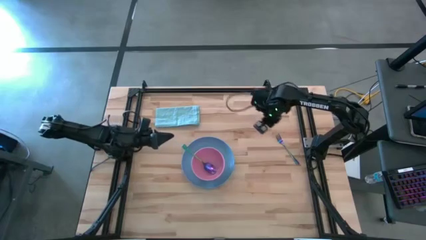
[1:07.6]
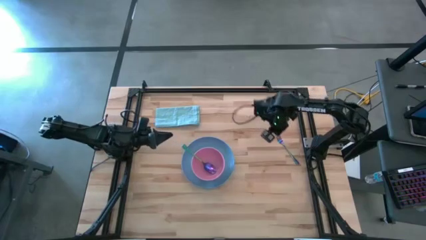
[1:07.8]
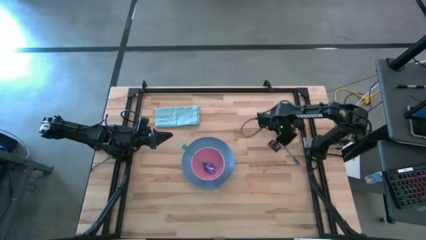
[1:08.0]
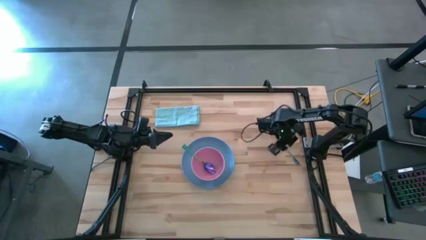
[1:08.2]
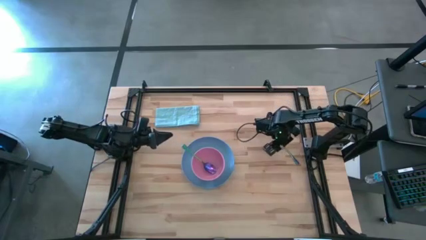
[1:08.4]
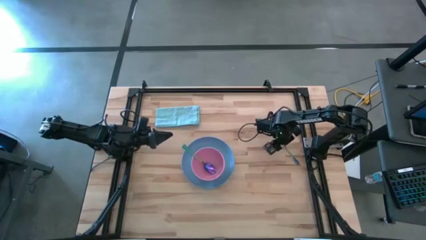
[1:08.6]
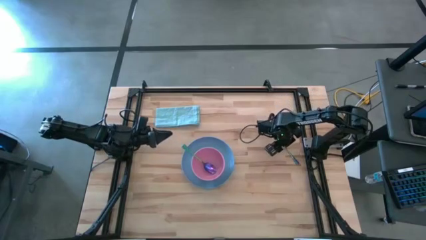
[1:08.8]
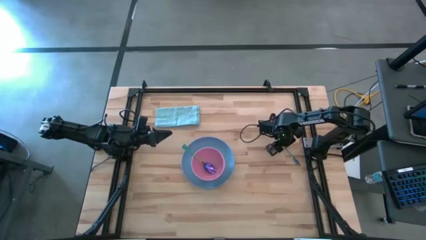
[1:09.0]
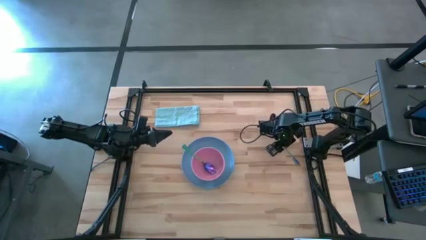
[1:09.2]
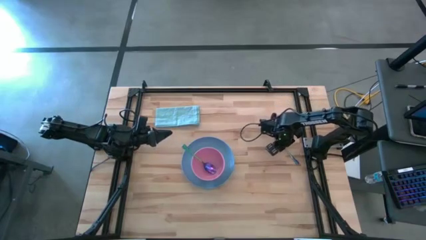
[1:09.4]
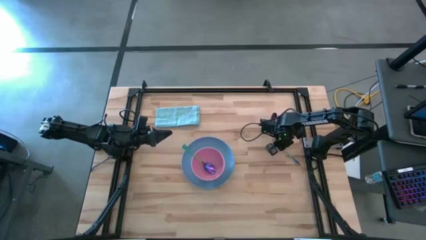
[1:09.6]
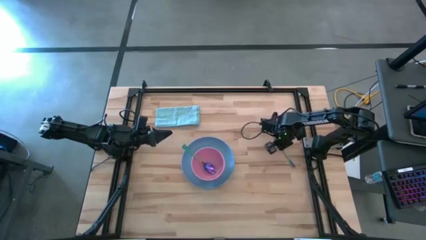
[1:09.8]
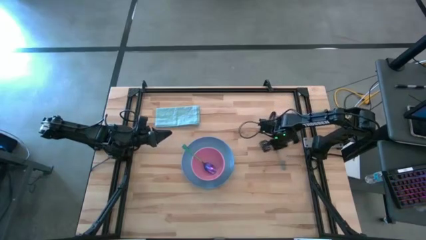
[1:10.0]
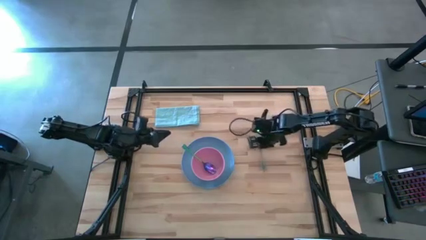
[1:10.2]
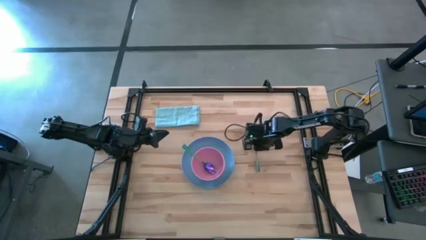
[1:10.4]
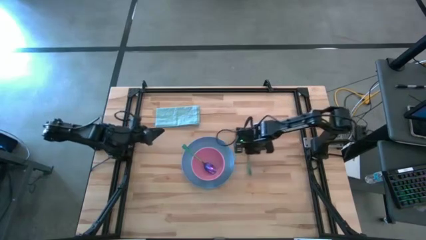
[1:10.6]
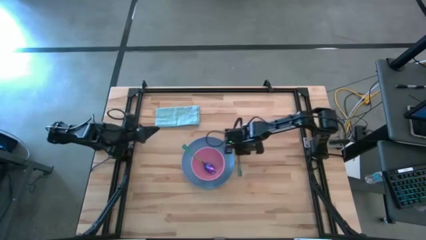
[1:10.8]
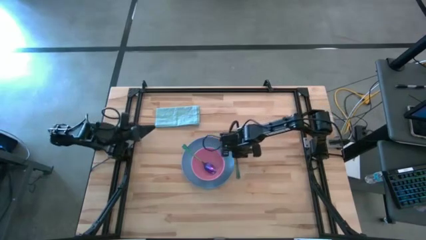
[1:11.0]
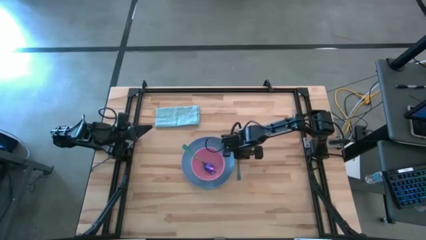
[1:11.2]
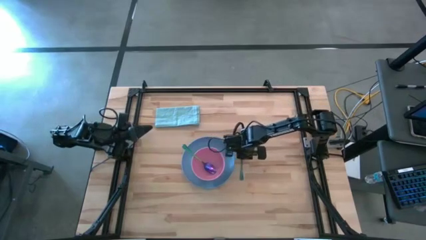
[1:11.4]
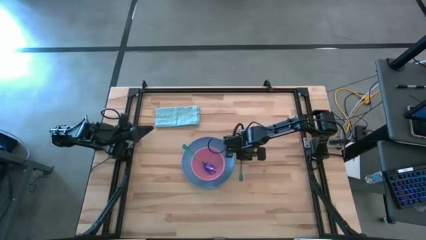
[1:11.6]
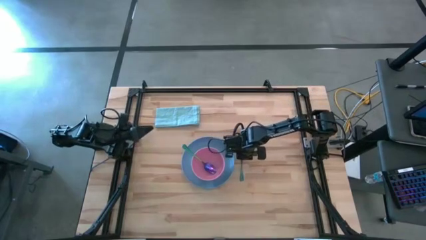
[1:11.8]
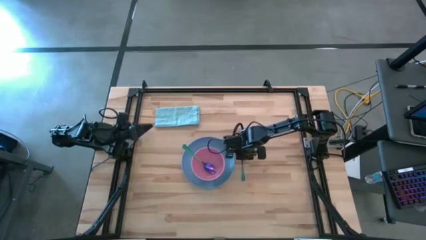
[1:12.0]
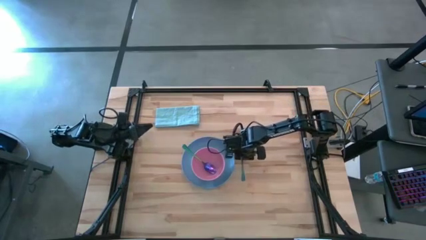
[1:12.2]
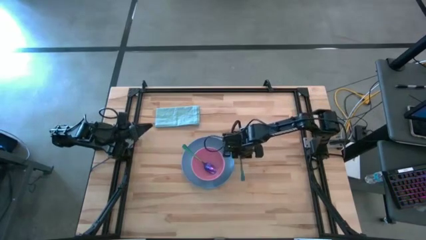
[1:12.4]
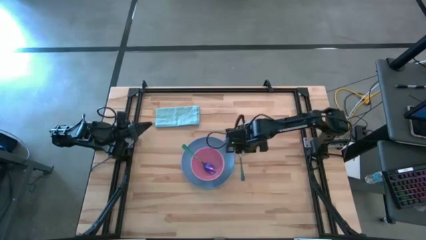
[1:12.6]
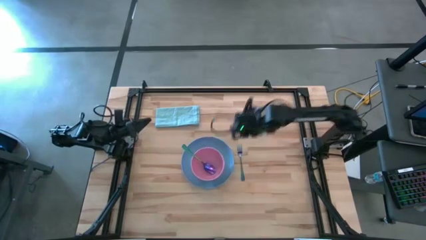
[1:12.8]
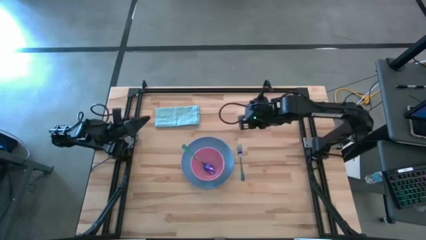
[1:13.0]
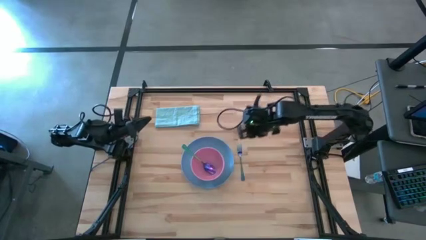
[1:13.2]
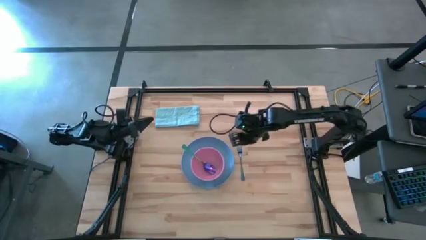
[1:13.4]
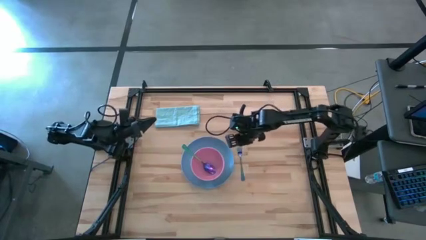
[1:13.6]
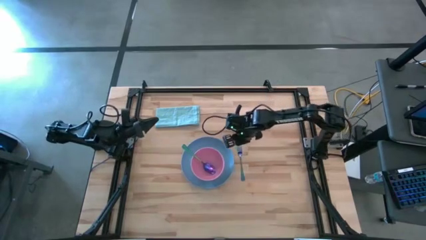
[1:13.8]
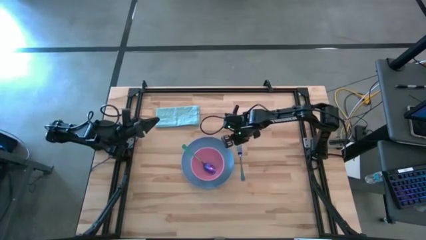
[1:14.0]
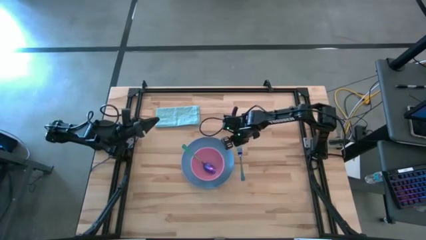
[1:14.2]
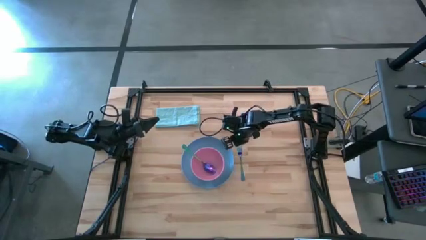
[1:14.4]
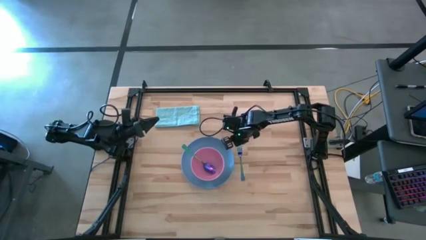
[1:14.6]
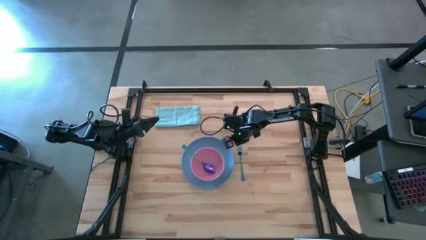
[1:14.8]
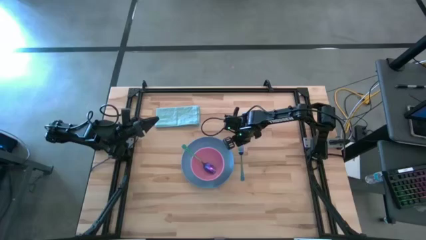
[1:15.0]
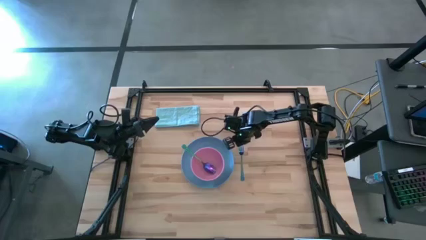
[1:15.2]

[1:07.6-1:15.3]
Task: Set table place
Put the blue fork beside the blue plate

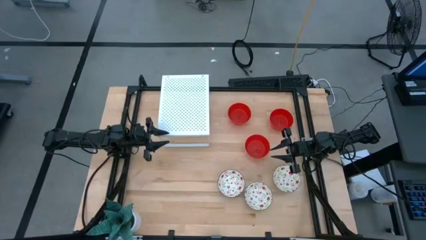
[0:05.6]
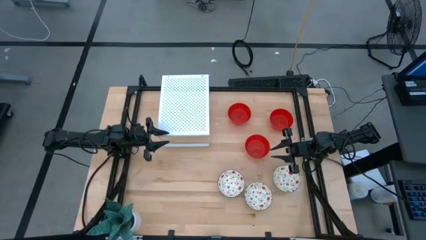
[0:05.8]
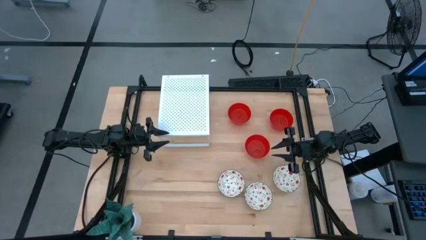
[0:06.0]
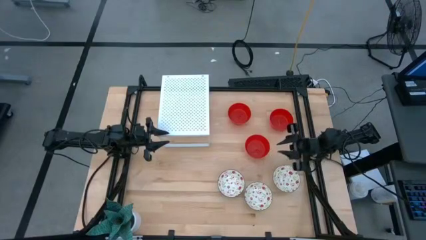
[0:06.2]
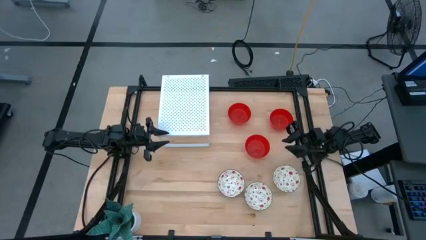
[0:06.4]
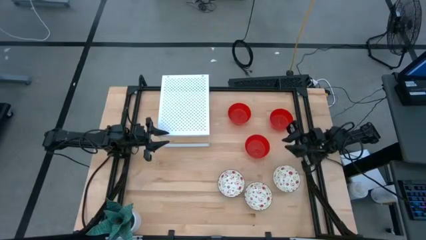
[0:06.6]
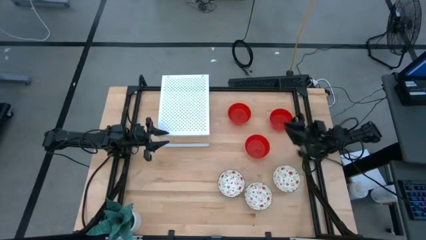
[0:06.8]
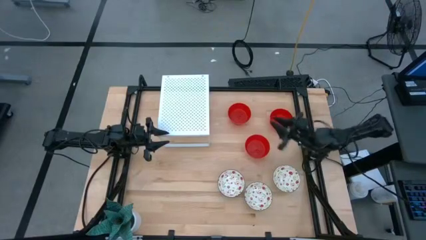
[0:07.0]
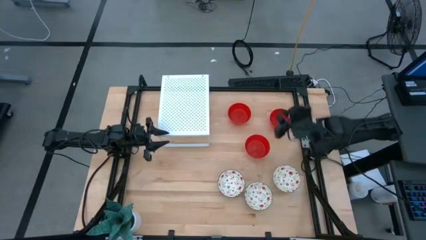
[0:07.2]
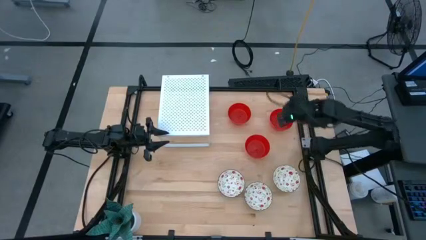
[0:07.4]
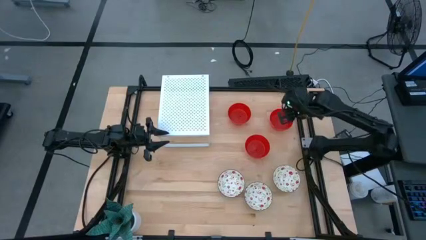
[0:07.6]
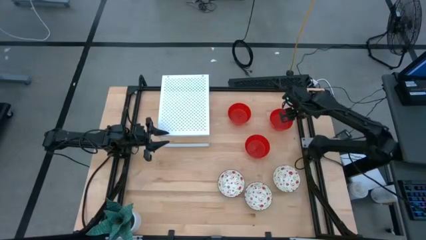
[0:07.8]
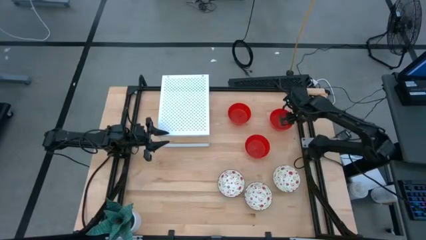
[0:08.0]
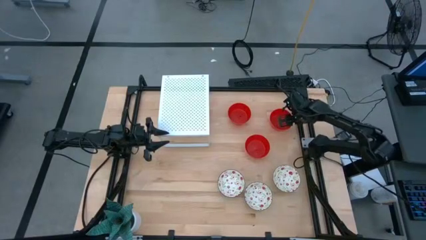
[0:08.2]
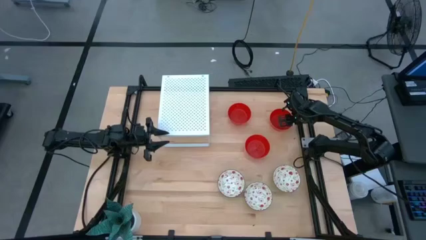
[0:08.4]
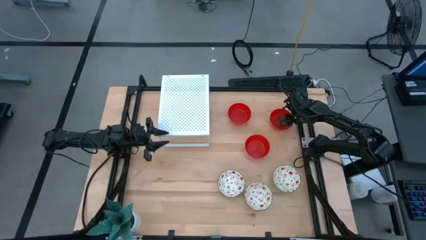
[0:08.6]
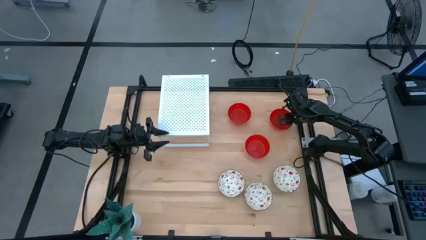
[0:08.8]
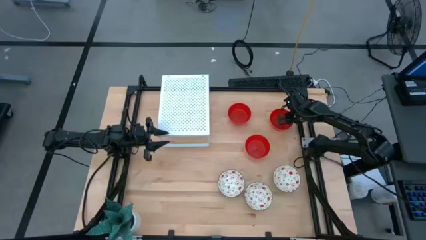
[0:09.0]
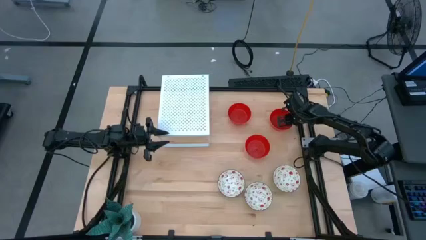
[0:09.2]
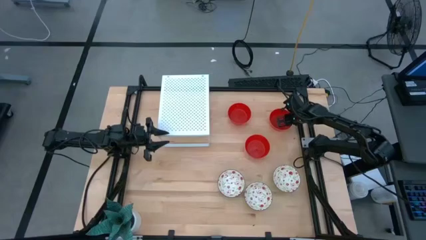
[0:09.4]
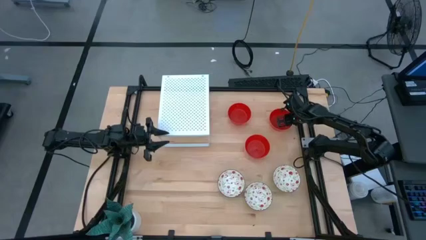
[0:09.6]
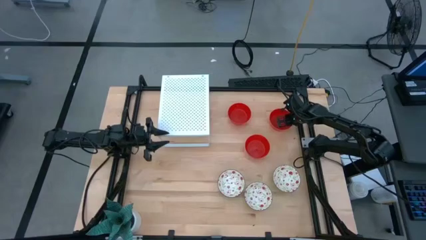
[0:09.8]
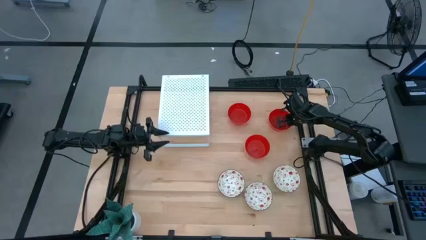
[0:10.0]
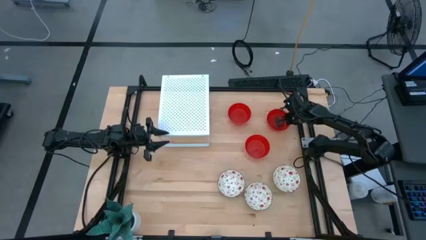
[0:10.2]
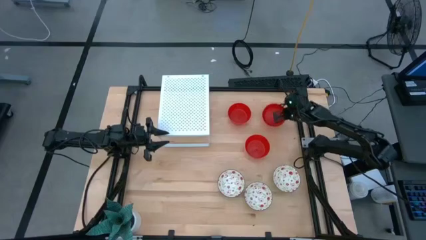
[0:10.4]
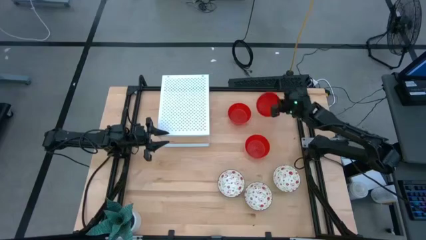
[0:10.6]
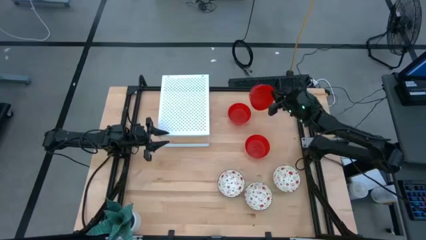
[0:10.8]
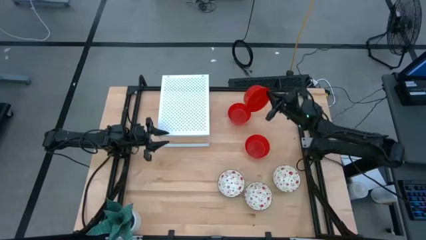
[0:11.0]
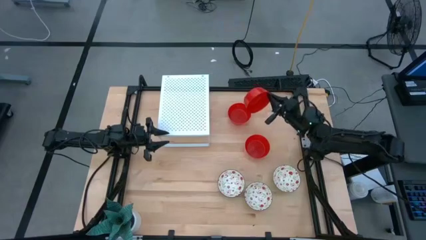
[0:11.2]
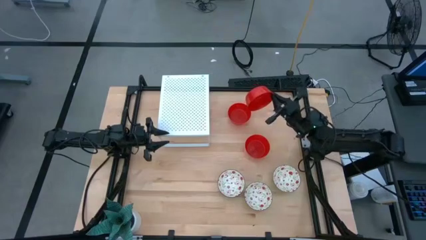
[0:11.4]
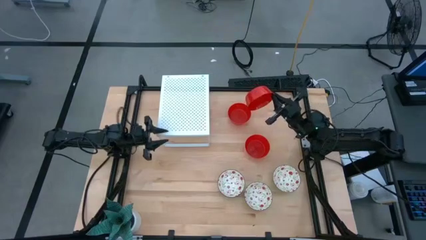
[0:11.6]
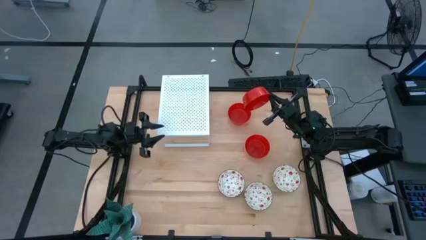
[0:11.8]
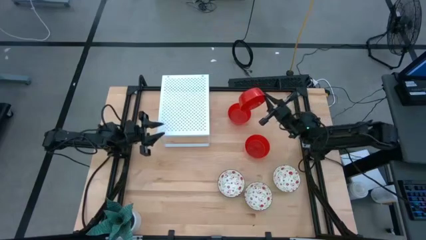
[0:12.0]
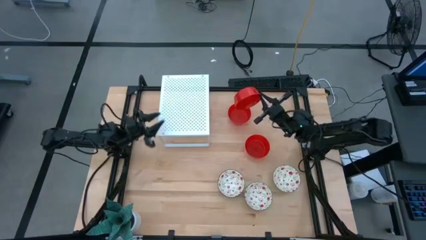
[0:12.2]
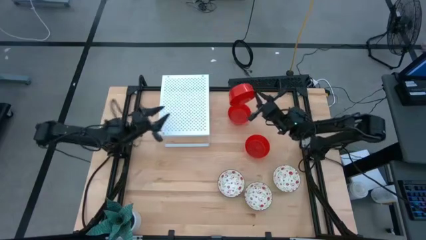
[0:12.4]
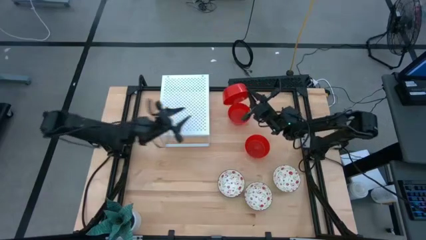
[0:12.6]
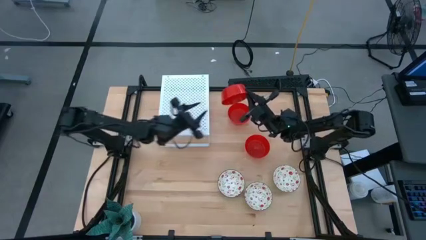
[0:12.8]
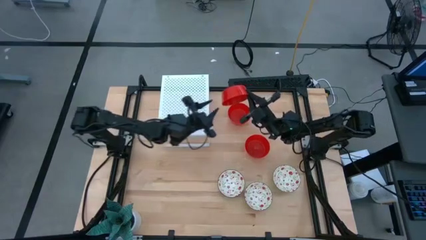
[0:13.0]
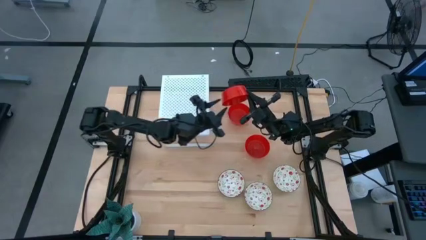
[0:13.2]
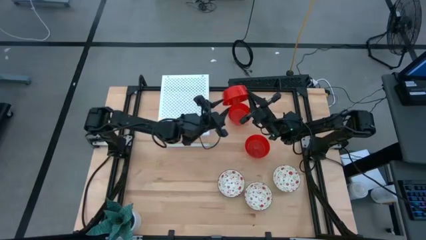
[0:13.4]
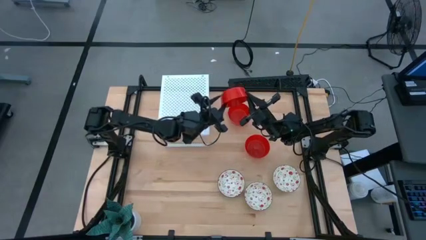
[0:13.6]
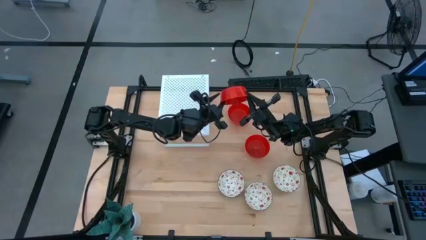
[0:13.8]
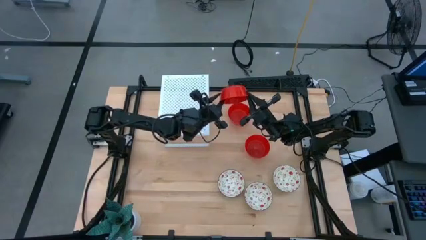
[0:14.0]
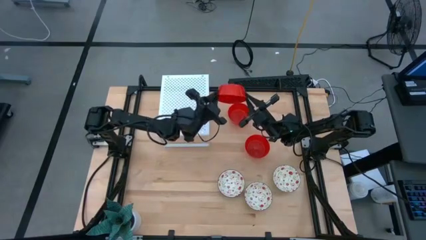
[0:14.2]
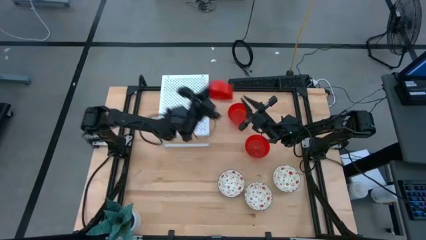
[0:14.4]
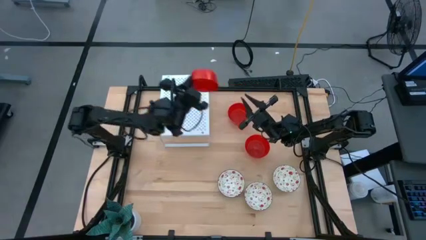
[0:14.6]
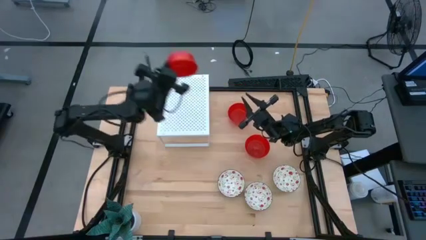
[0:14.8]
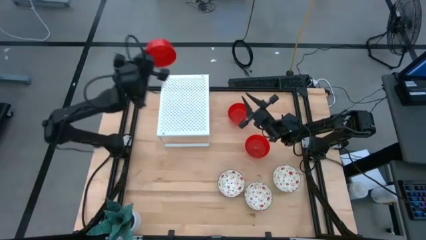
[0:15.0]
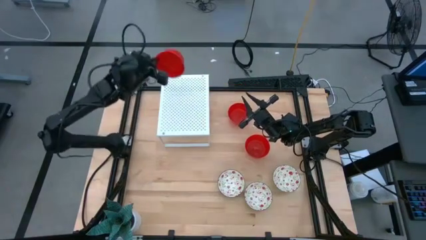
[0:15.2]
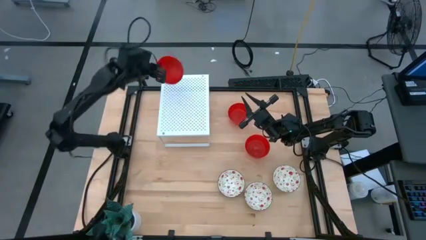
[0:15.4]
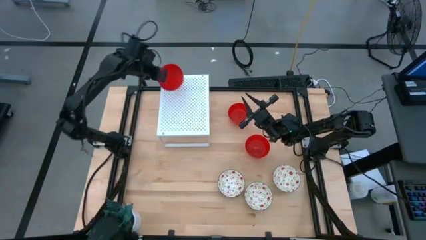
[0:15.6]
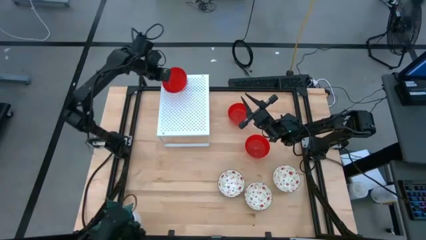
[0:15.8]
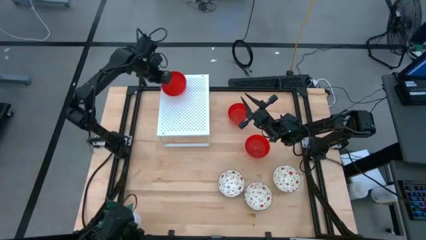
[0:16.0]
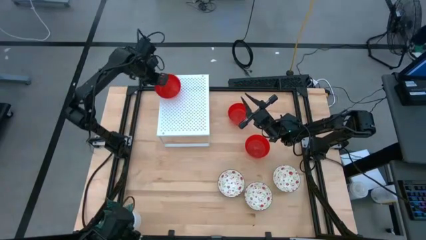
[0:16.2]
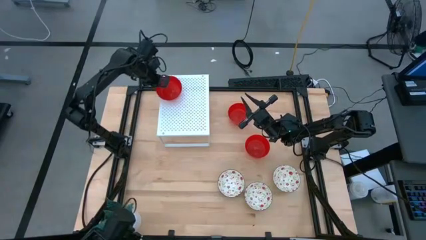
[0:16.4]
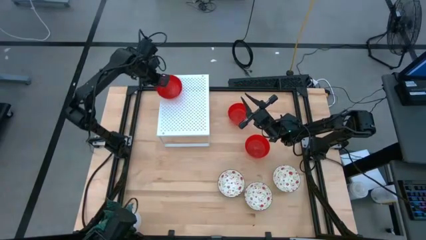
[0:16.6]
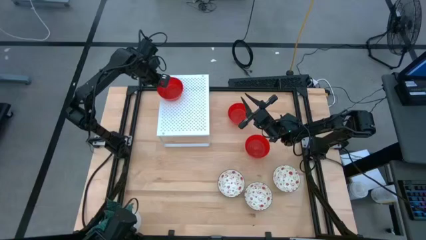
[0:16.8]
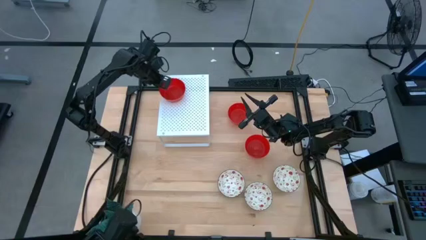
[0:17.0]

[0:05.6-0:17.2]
Task: Pick & Place Mini bowls
Put the top right red bowl on the shelf
